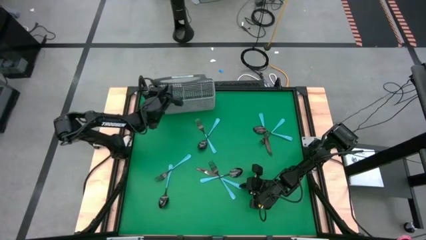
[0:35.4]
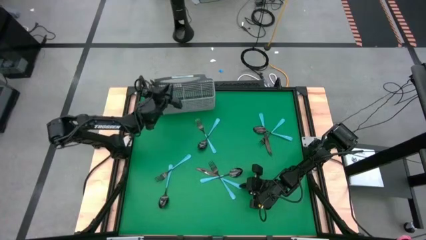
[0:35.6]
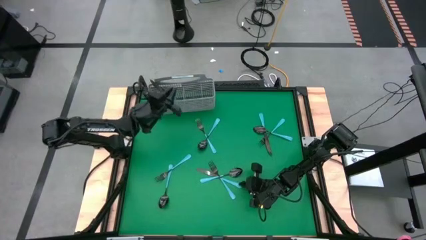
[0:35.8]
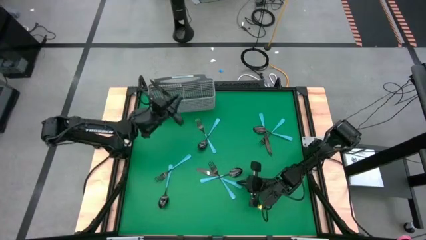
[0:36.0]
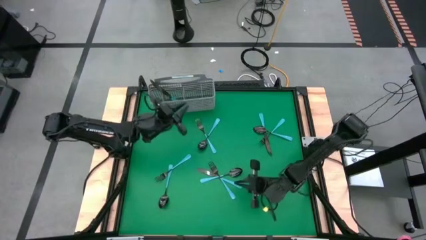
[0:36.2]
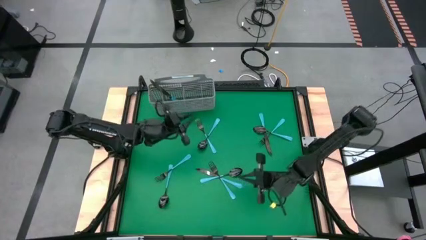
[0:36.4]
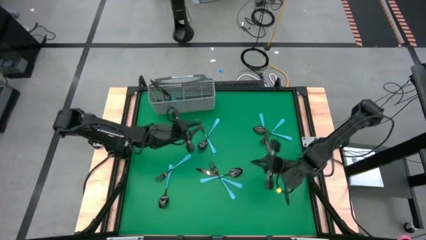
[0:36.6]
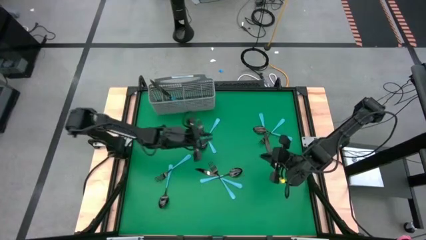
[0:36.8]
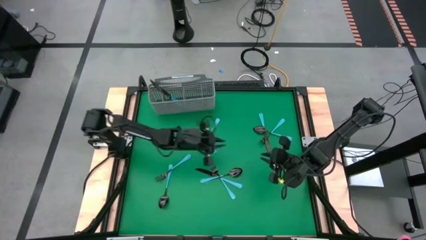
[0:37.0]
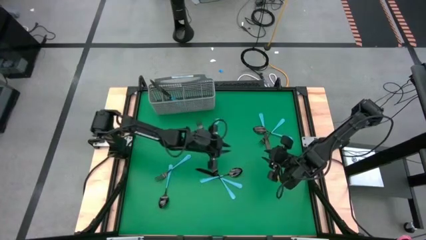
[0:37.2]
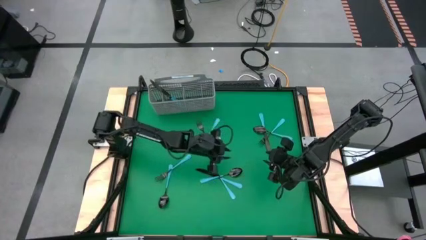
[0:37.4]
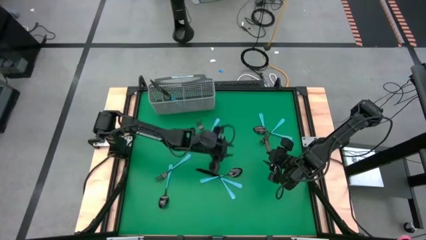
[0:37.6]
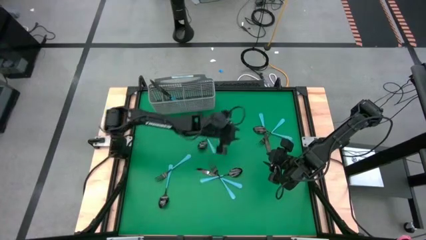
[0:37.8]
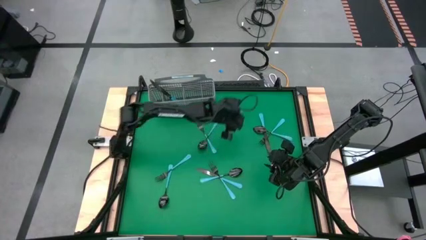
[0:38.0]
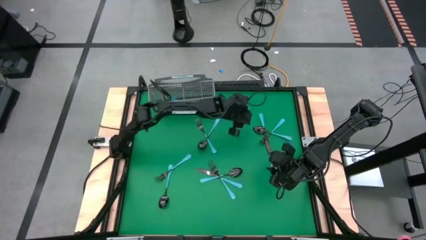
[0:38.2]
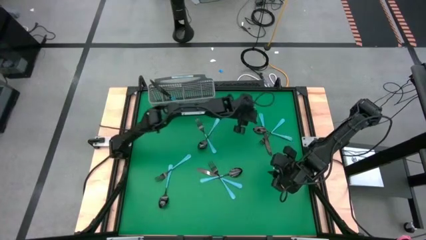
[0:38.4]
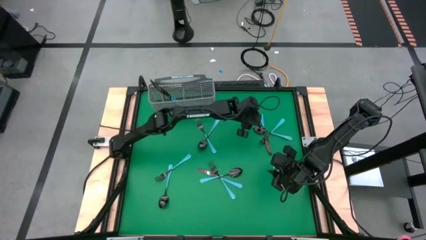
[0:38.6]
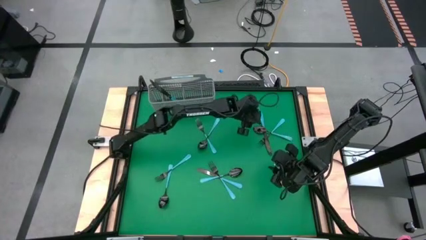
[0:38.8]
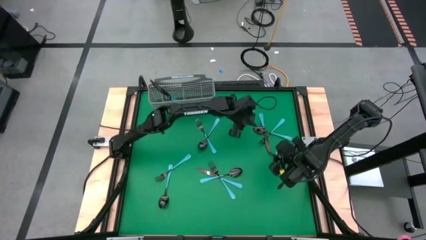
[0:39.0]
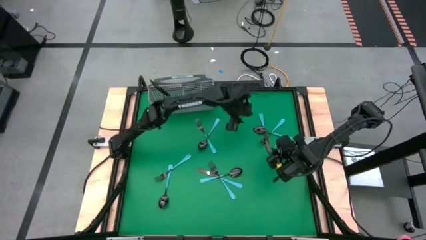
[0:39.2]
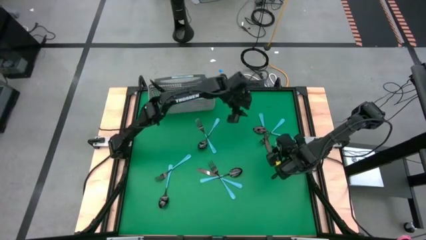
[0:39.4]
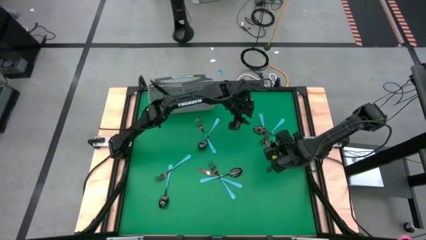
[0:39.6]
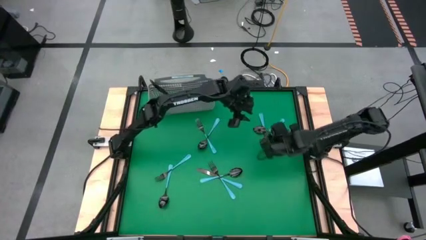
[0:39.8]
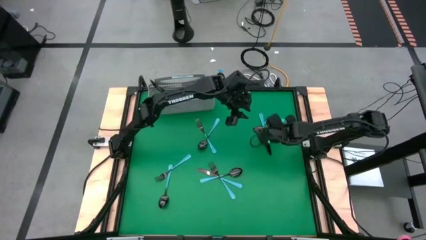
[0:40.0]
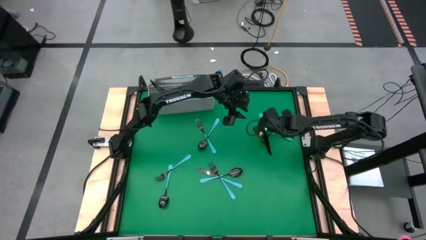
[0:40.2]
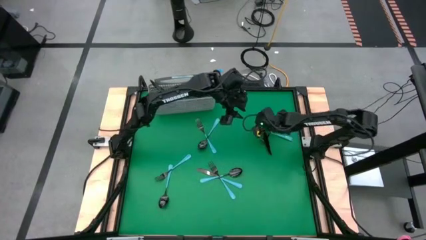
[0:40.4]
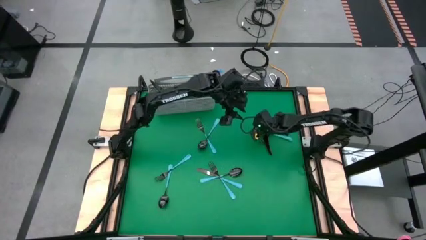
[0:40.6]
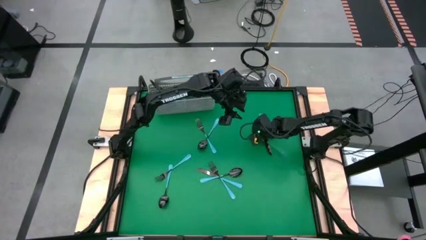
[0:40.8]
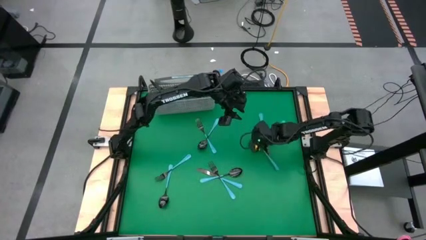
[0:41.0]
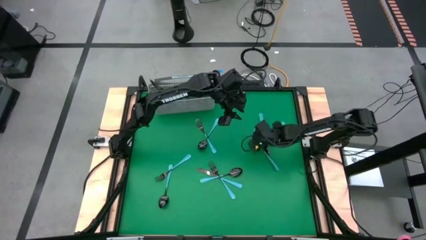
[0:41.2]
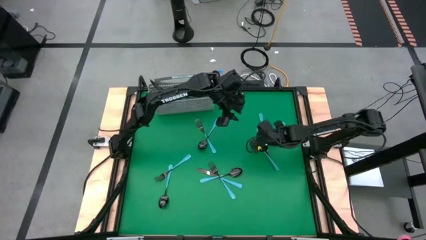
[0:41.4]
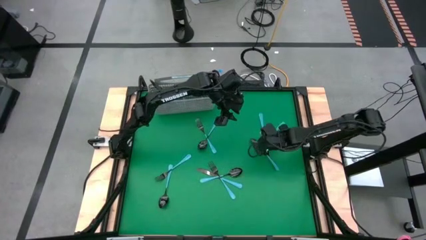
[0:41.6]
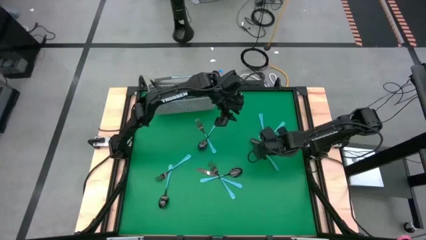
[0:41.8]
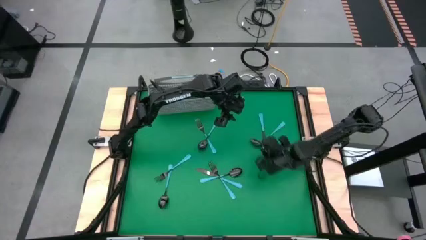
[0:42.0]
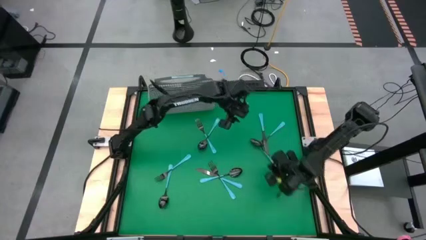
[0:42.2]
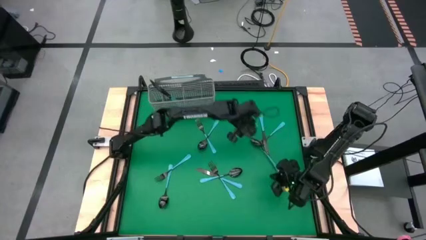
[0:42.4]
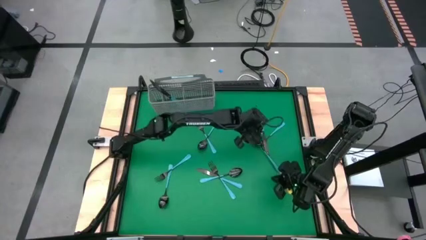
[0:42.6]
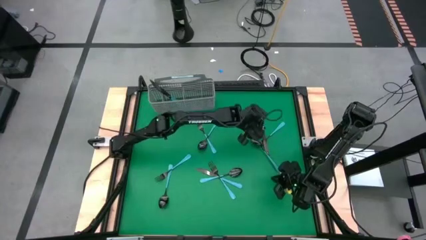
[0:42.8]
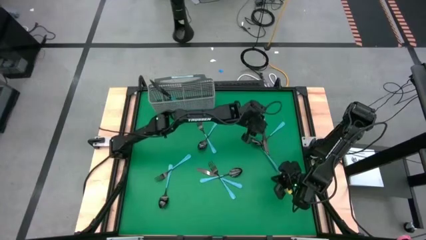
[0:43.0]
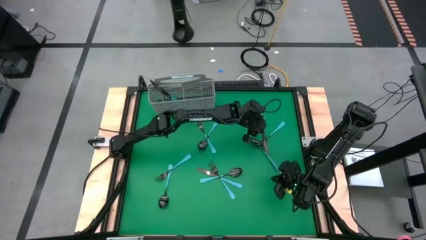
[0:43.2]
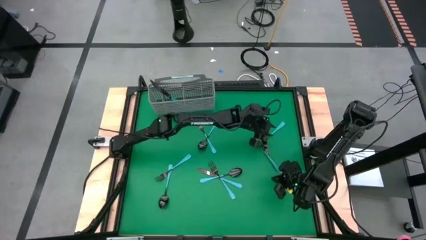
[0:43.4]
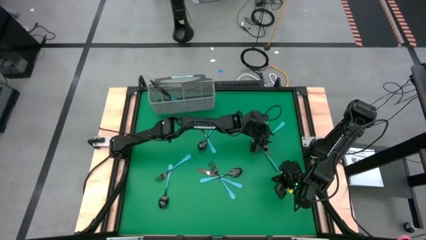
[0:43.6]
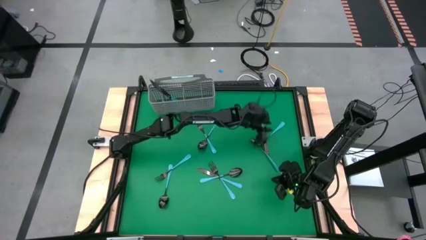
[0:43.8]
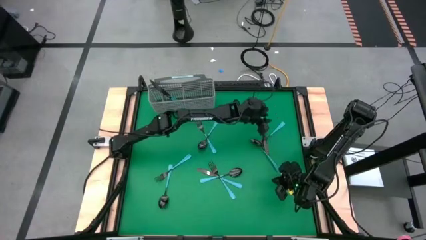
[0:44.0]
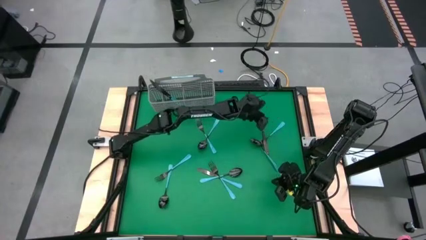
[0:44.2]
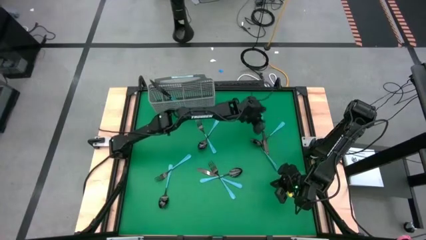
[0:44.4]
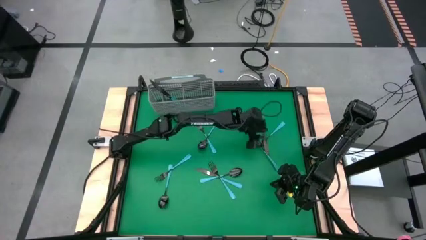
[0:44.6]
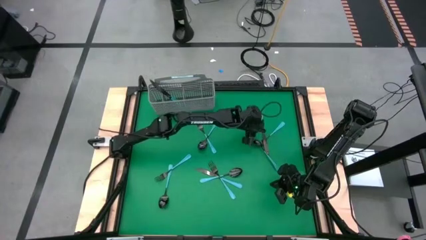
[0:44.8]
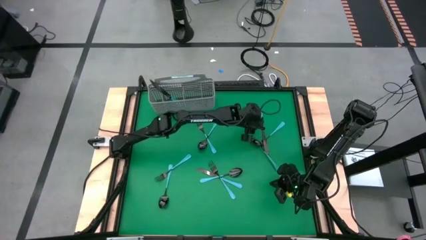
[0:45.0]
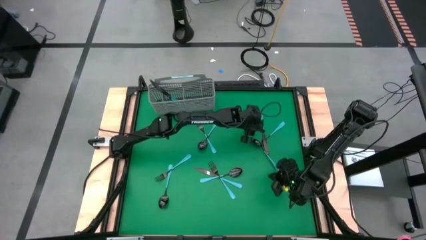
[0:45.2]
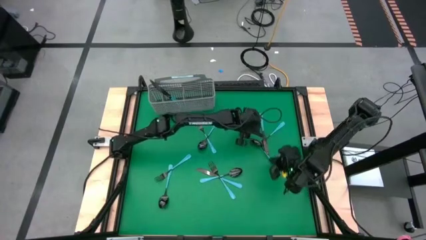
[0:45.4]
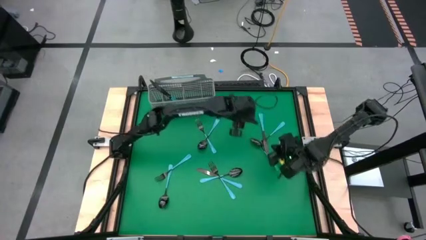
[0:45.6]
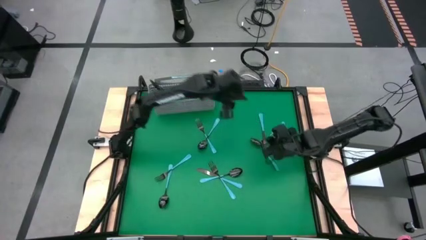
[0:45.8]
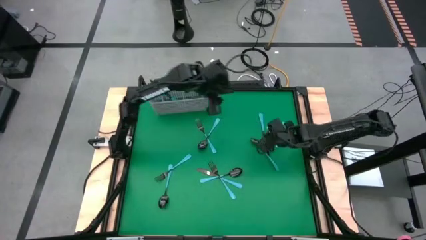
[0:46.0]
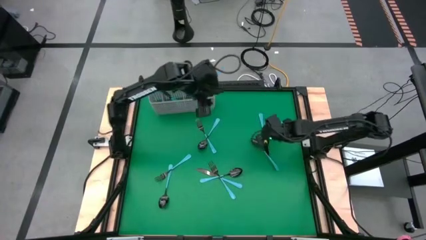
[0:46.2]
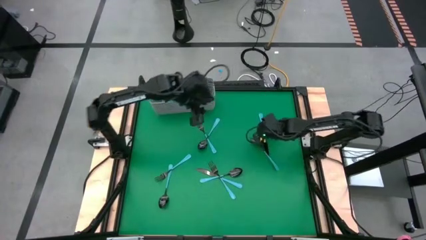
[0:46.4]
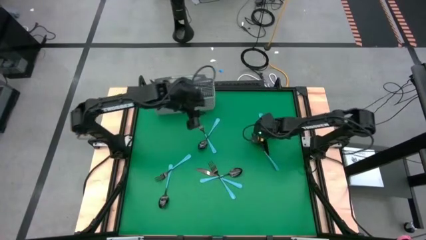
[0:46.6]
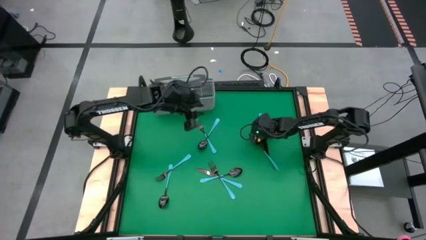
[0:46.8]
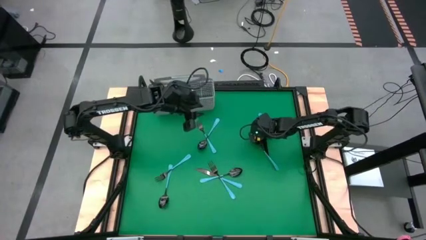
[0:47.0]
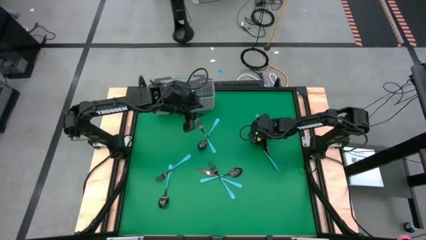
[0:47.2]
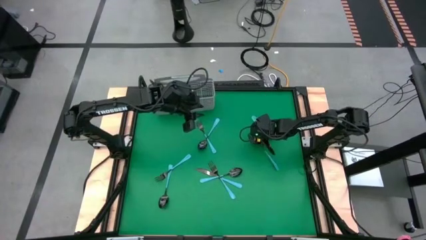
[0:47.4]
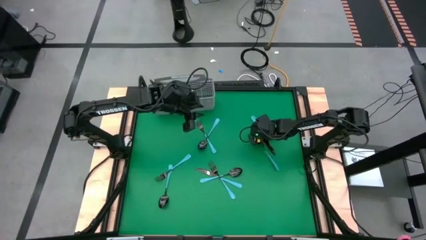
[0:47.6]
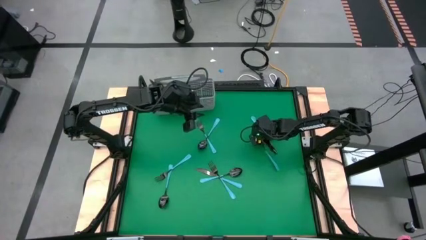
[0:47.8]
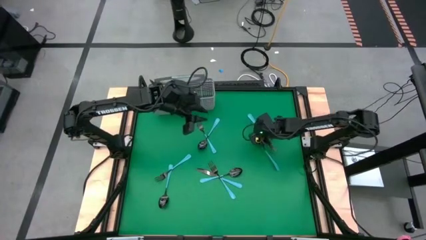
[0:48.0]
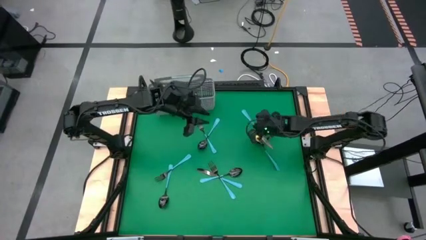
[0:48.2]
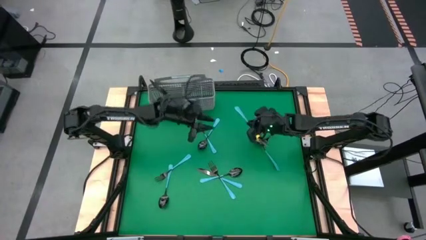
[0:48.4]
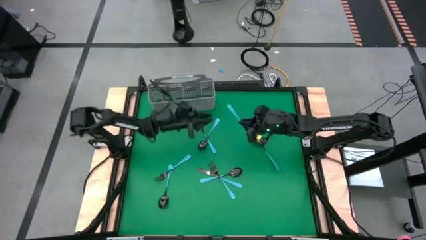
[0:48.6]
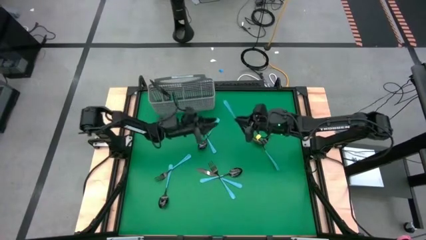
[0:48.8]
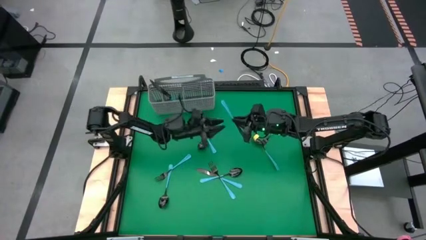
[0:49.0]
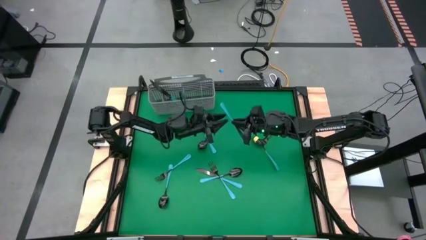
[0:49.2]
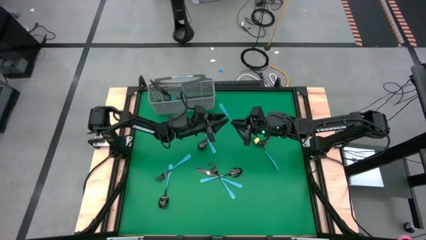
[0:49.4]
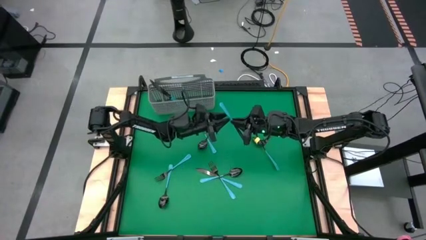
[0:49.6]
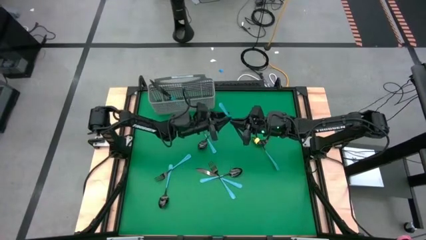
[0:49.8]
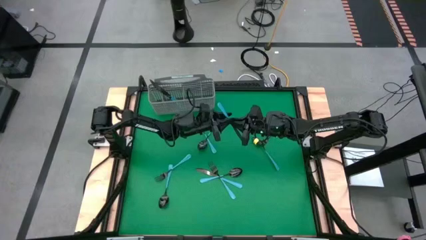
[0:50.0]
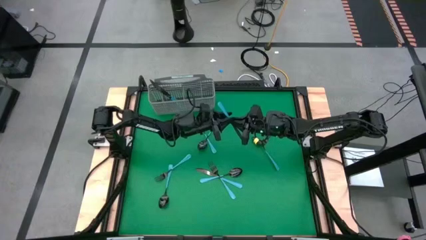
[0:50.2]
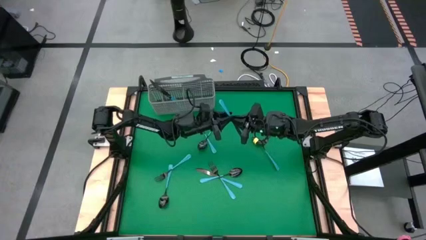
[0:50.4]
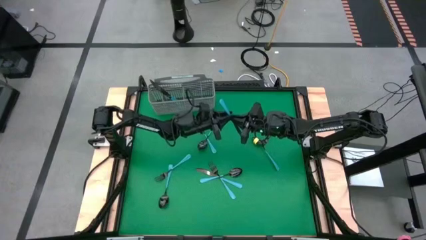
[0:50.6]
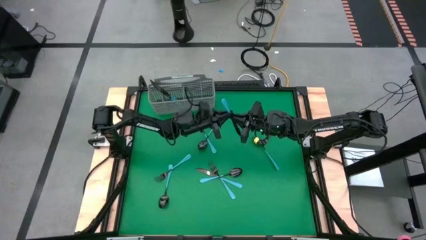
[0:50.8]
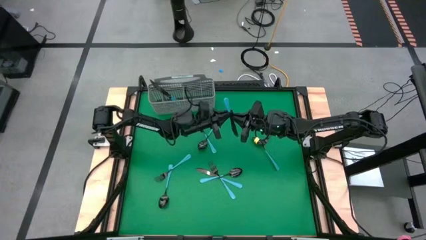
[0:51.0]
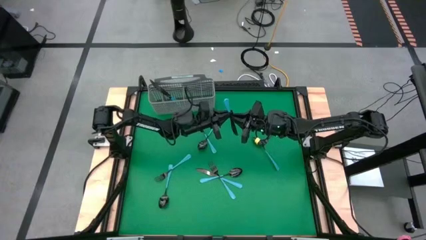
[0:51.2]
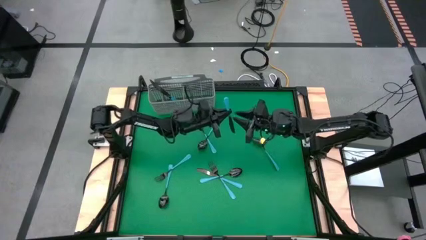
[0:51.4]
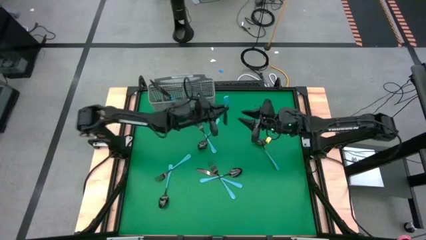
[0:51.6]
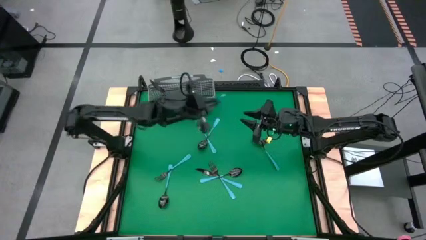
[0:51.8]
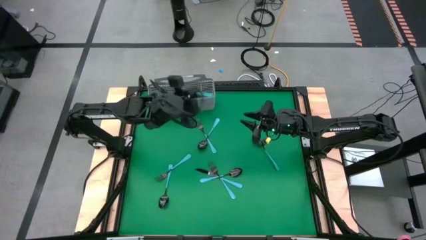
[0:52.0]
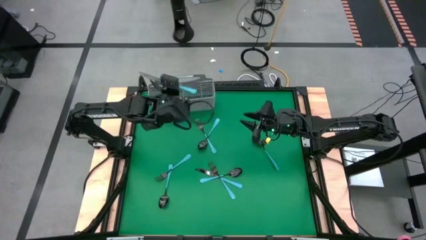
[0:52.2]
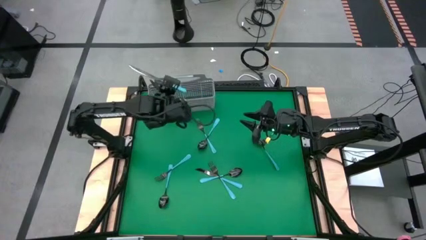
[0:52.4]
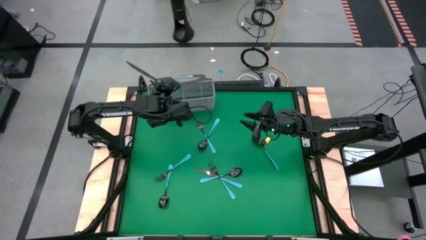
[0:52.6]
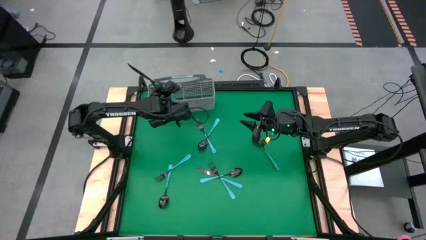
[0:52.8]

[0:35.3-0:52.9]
Task: Sort silverware
Put the table knife into the silverware rack
